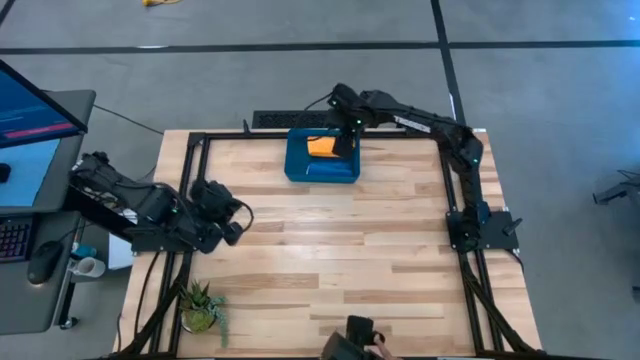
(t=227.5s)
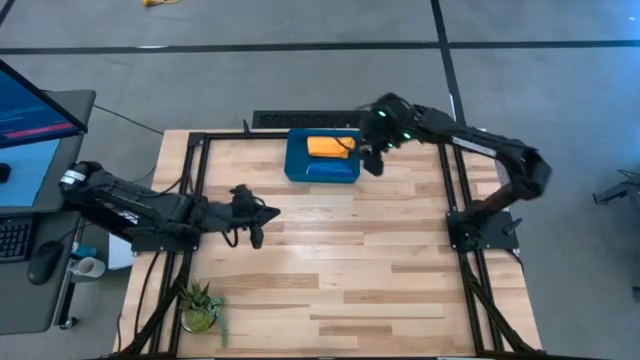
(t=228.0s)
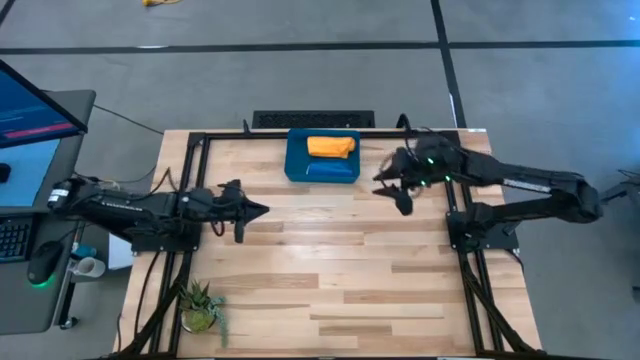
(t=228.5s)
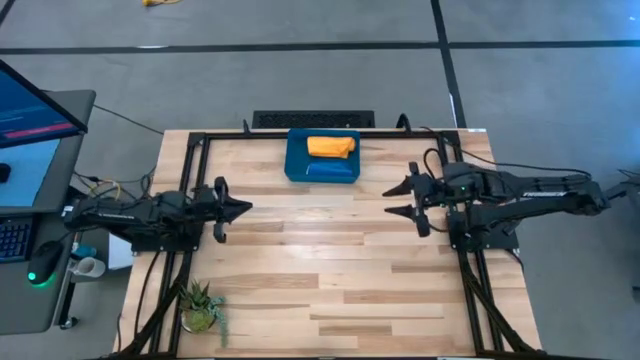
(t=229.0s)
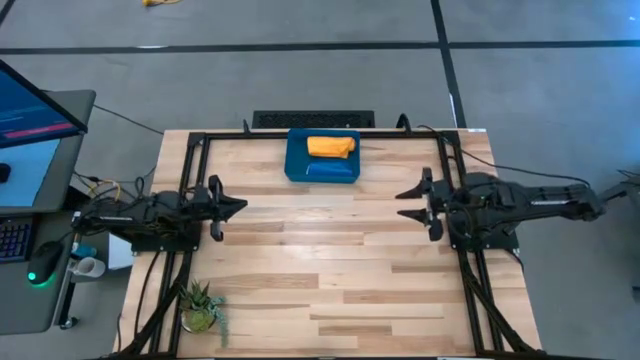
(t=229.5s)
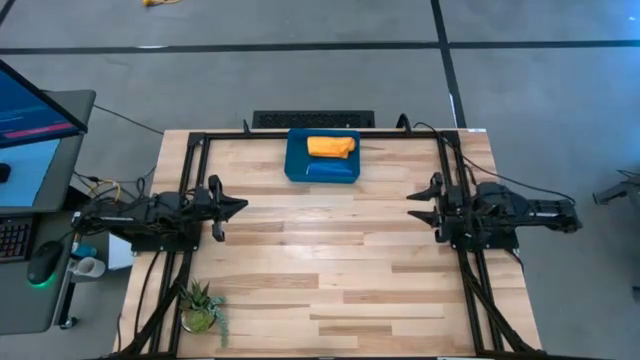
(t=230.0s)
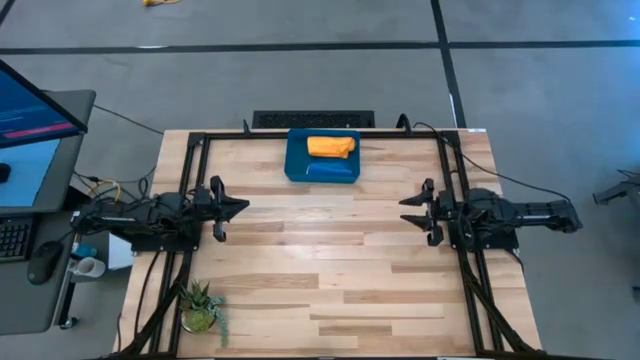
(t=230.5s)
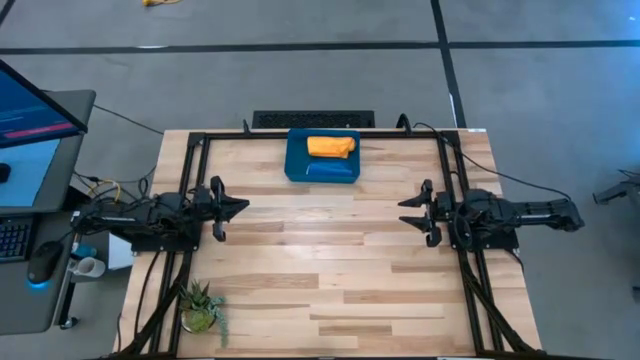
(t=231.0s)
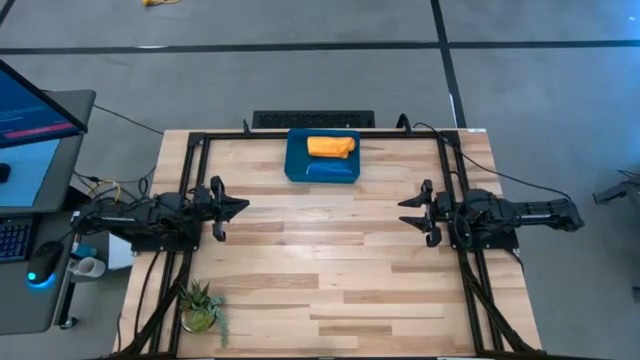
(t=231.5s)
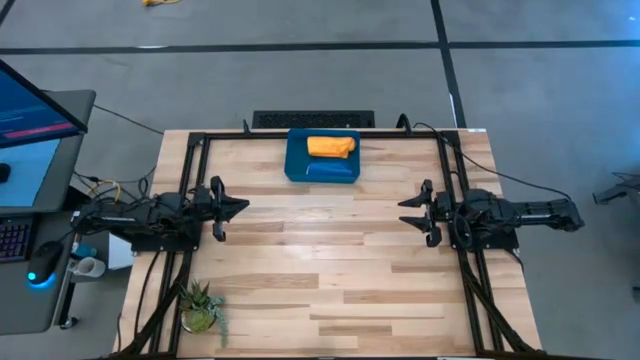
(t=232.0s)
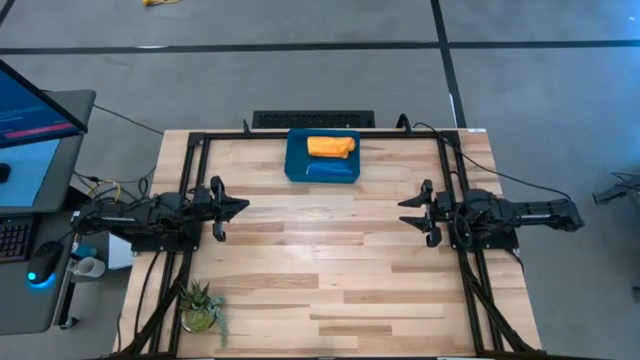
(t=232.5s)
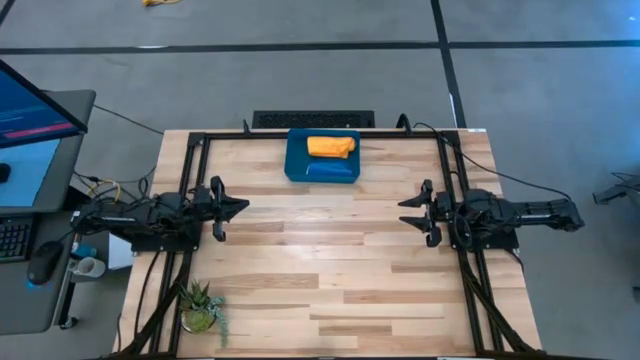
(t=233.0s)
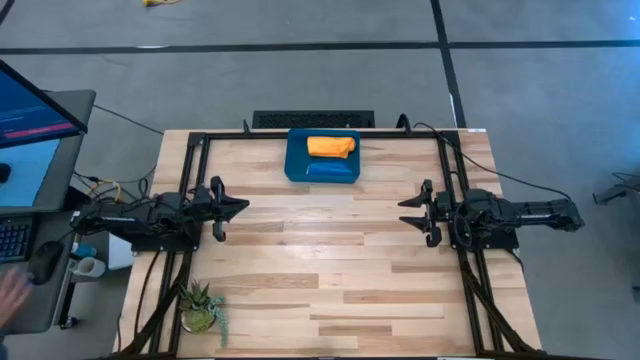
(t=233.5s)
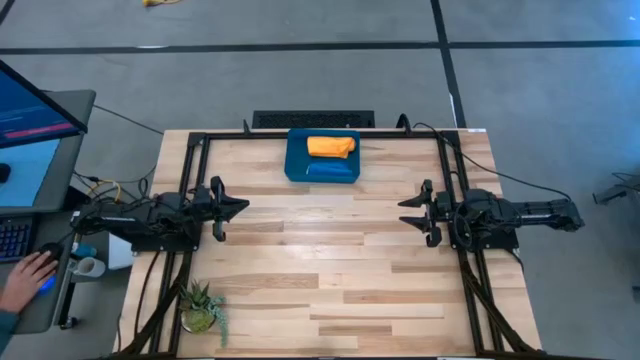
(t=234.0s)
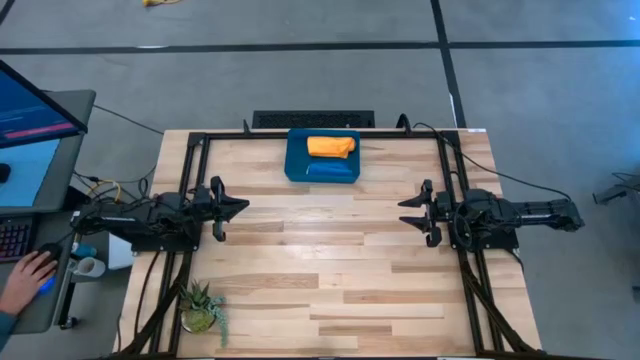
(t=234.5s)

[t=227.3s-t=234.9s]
Task: Roll microfiber towels into tight, uniform cylinder then place into a basket
Return to Home Position

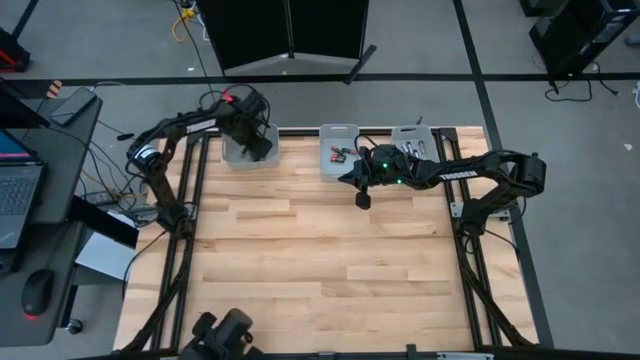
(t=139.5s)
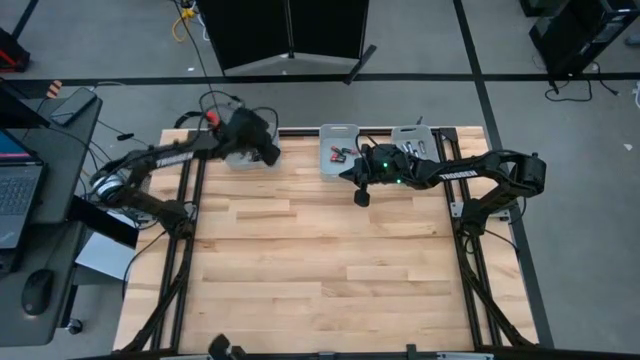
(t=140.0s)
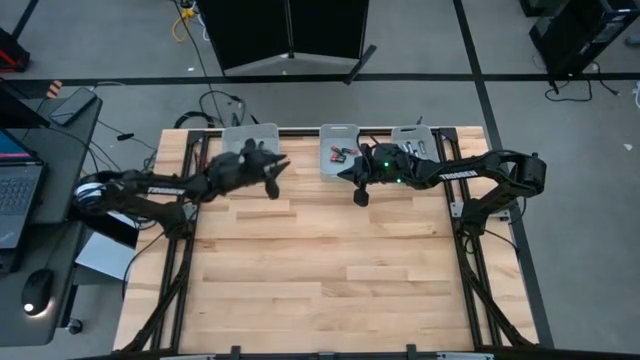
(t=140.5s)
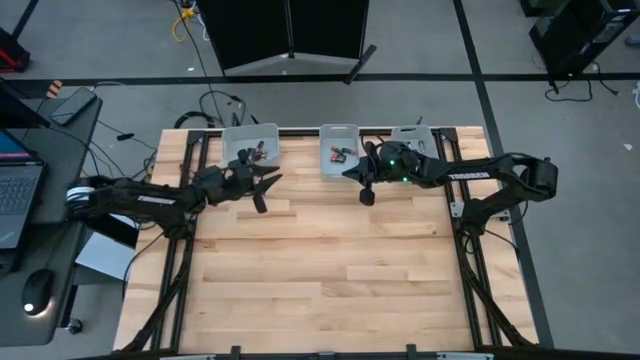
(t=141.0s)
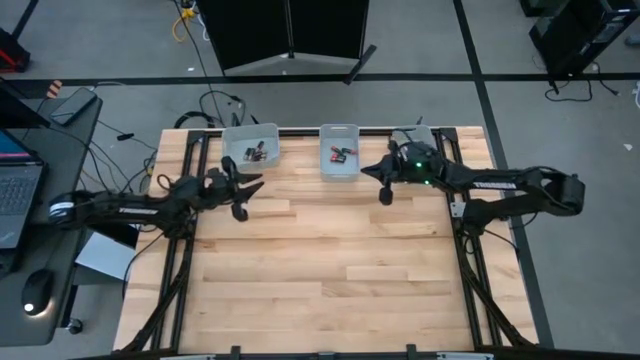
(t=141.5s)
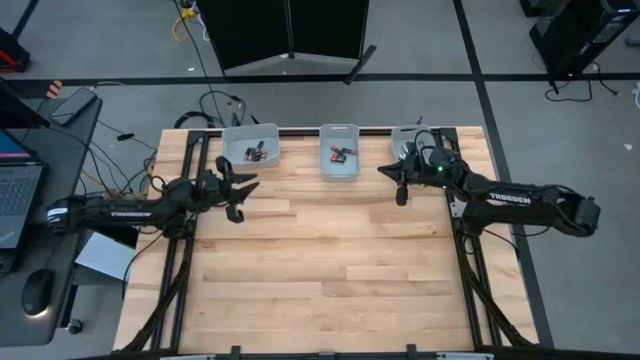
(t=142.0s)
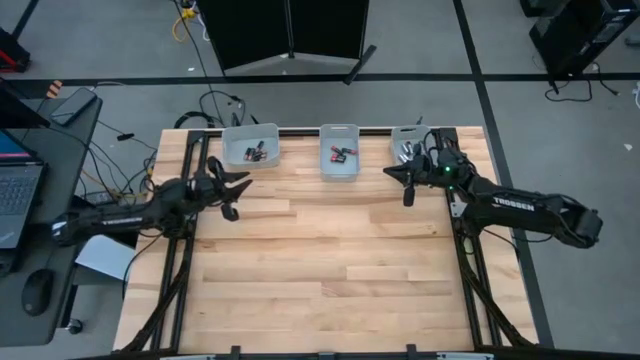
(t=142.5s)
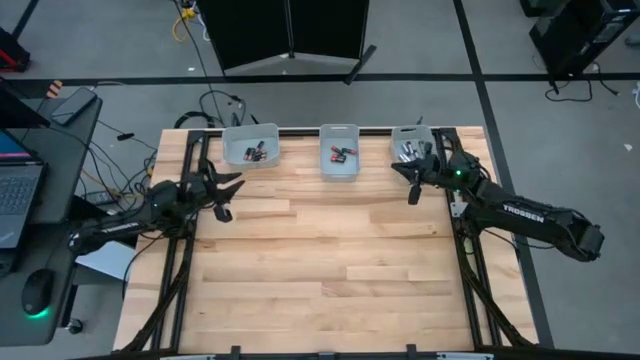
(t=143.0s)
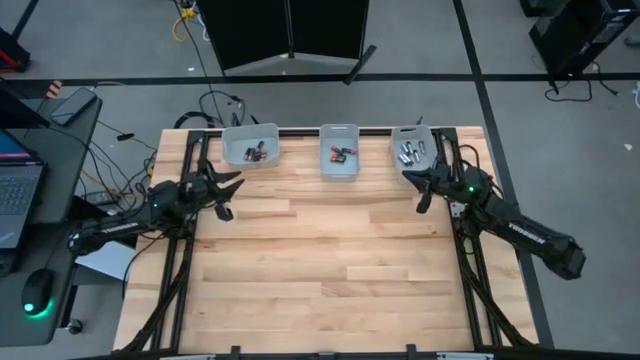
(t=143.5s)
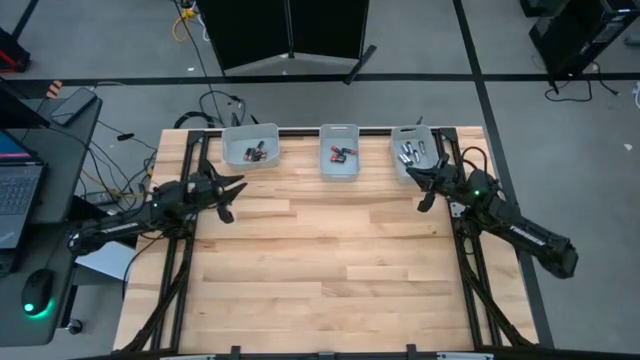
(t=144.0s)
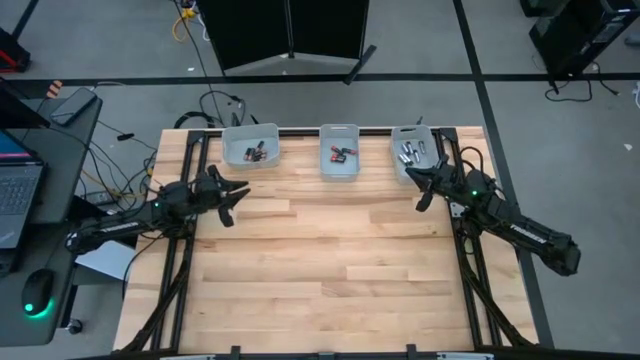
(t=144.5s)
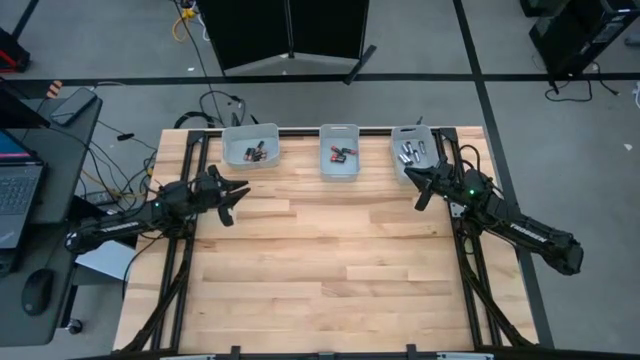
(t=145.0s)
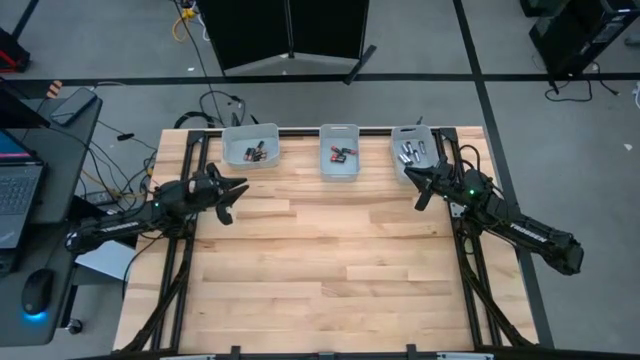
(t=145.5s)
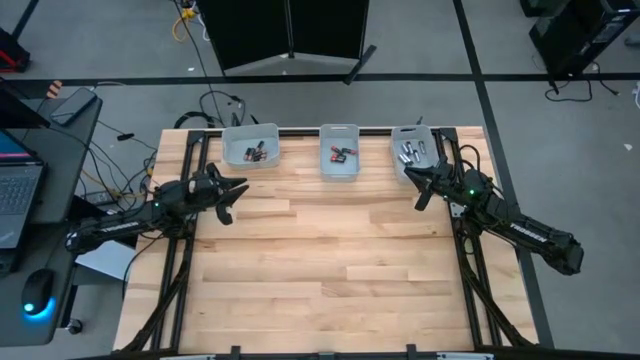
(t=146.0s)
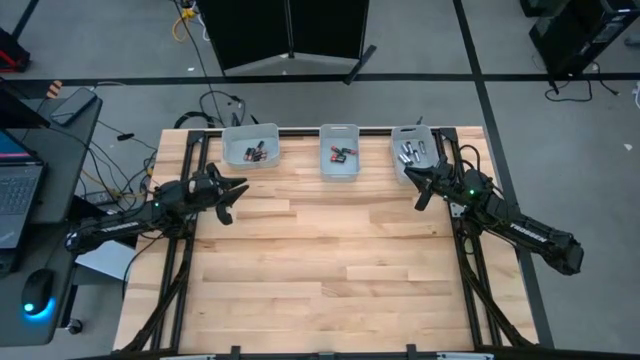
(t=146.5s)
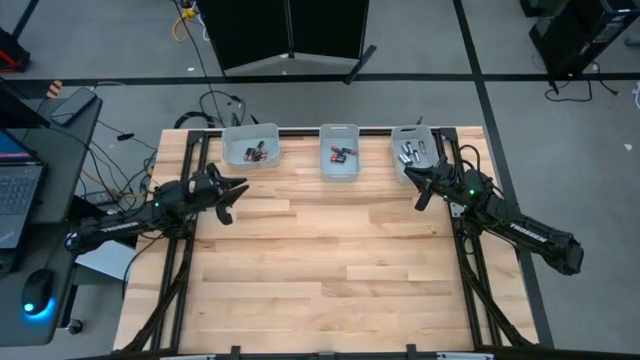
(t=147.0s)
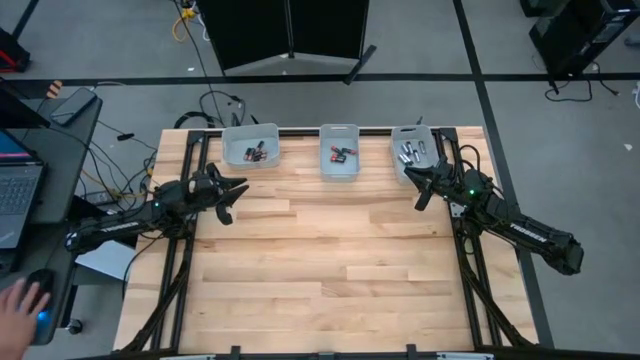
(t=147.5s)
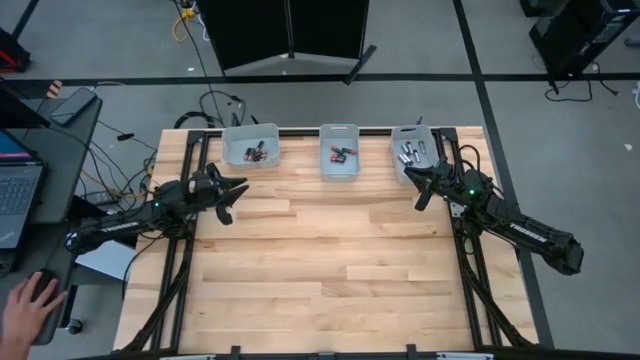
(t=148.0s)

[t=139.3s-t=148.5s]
Task: Sort batteries
Return to Home Position
